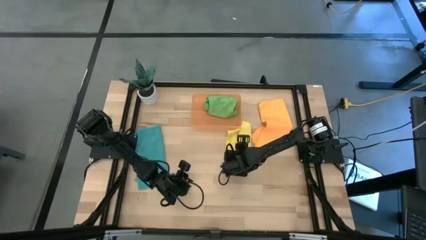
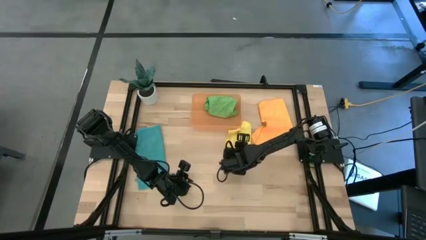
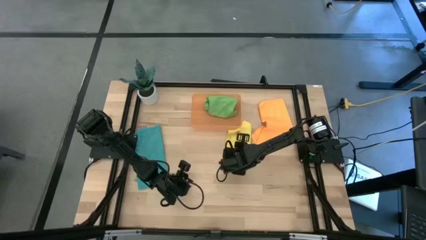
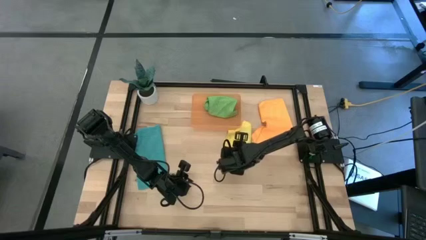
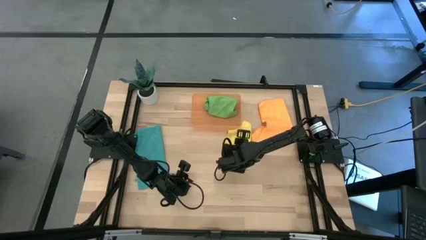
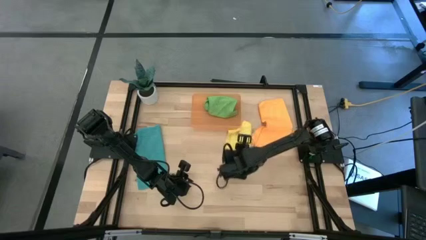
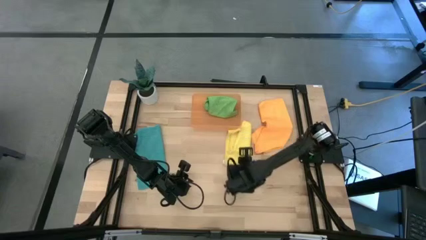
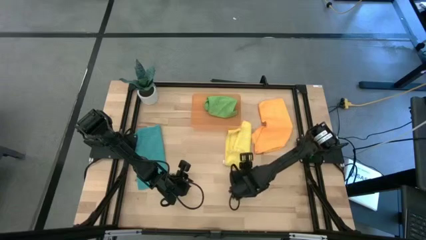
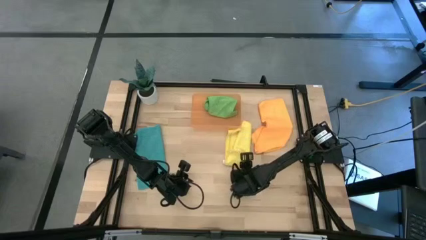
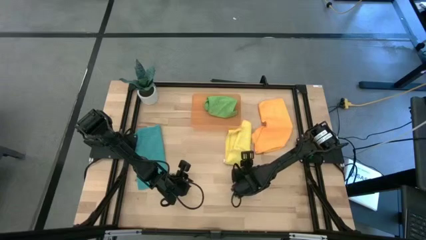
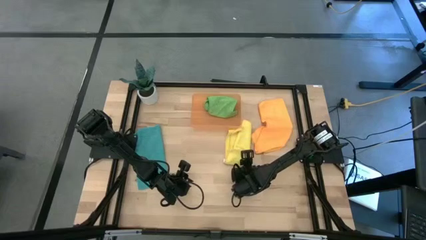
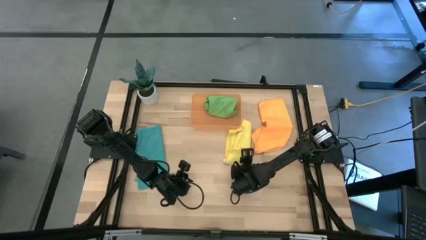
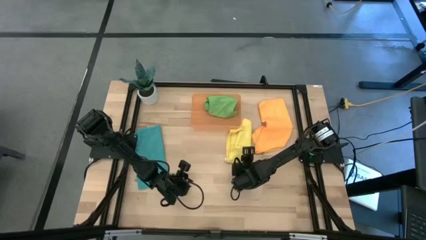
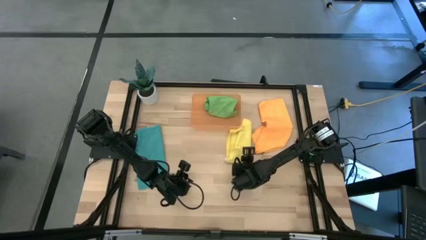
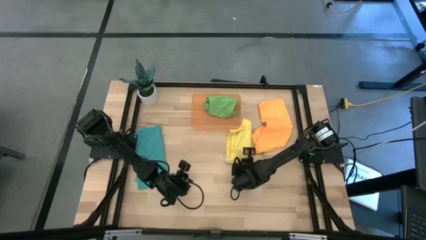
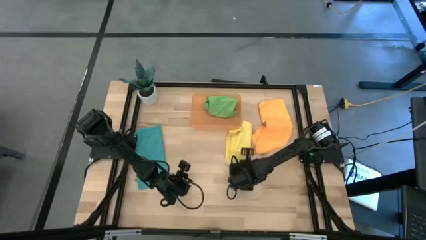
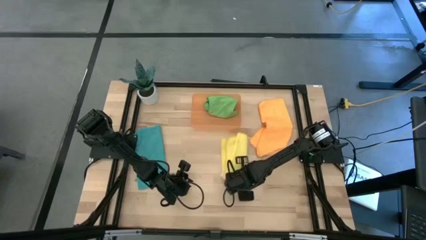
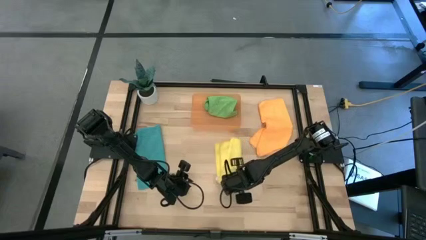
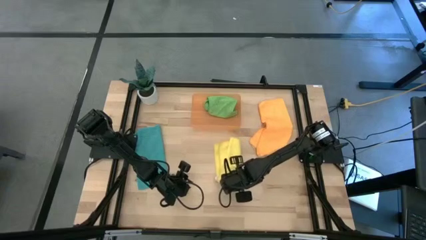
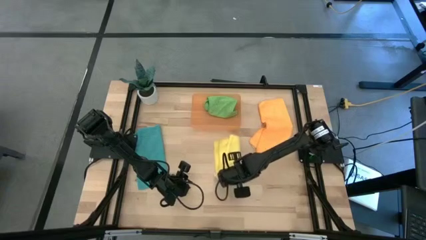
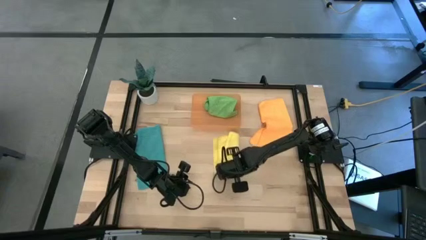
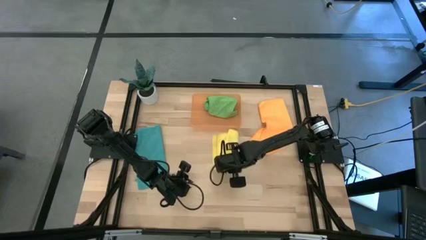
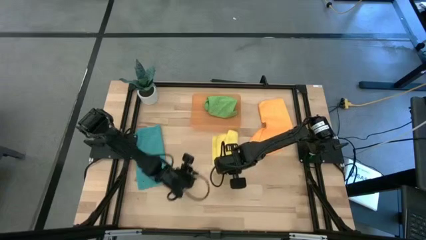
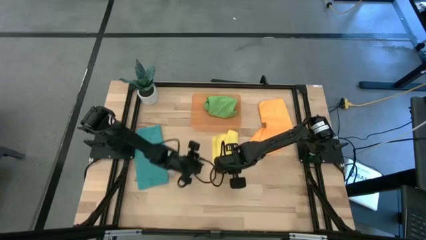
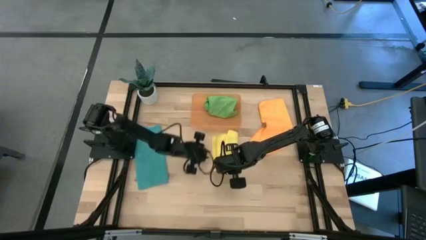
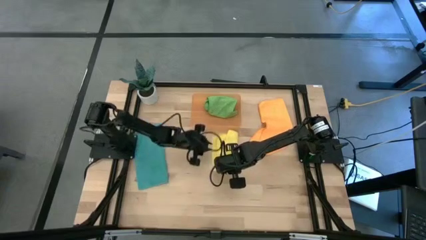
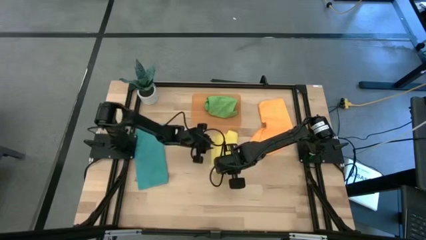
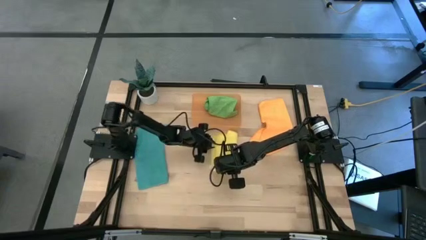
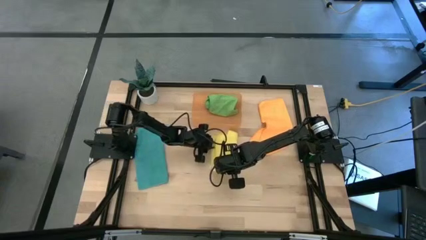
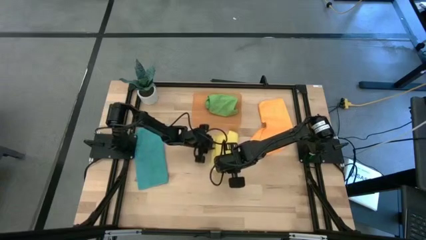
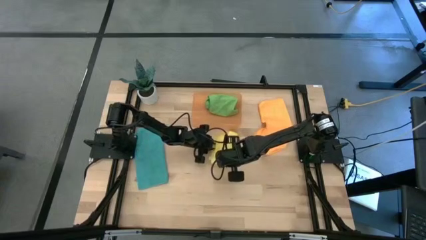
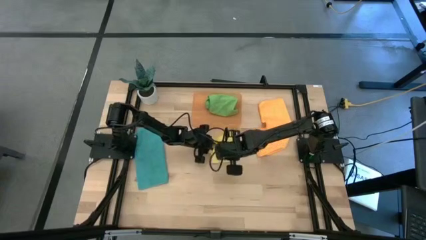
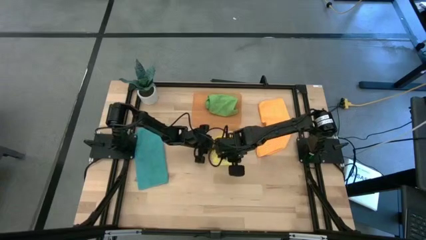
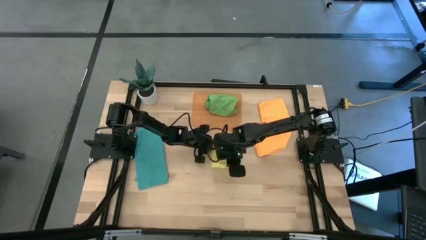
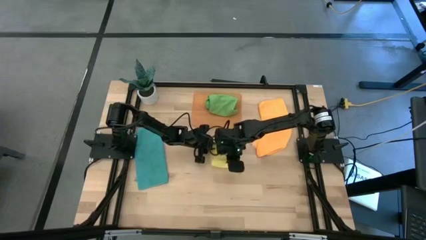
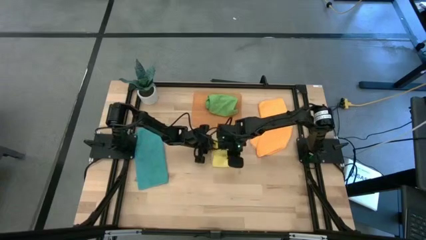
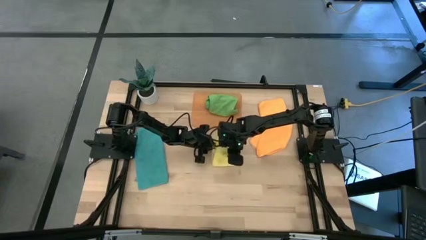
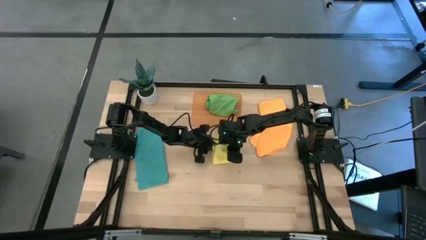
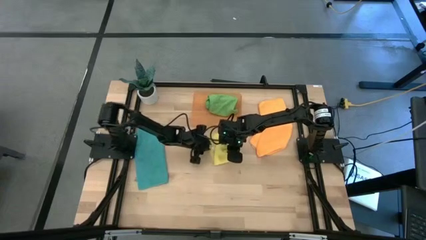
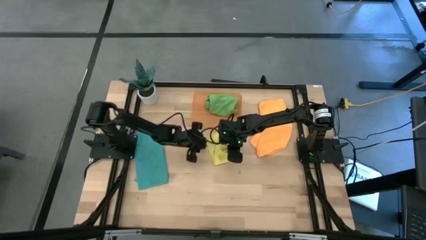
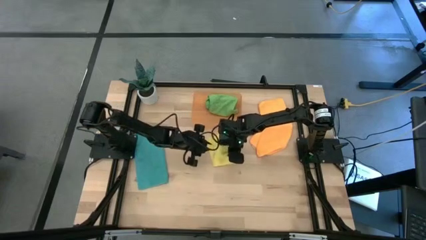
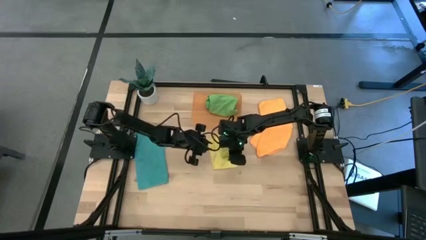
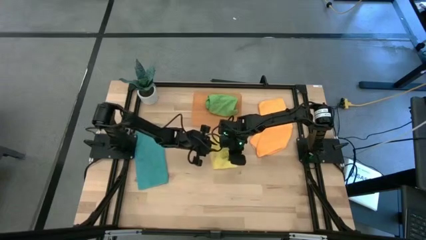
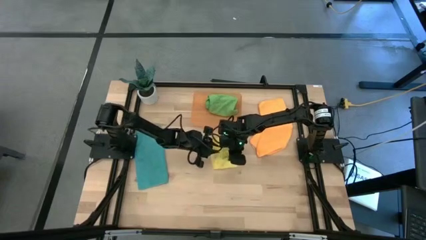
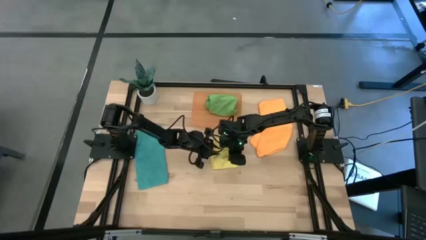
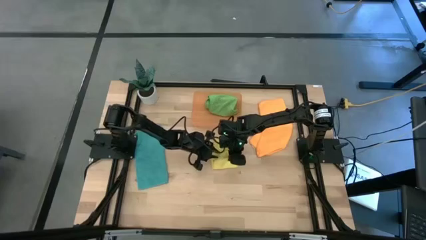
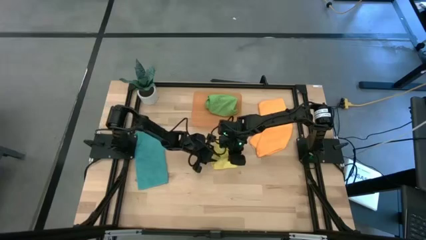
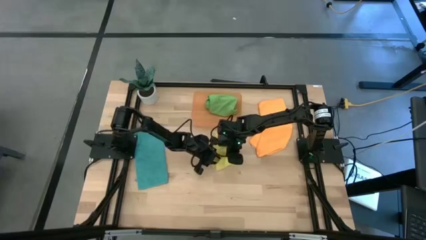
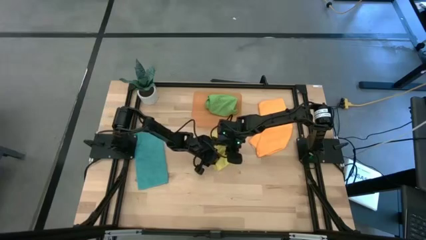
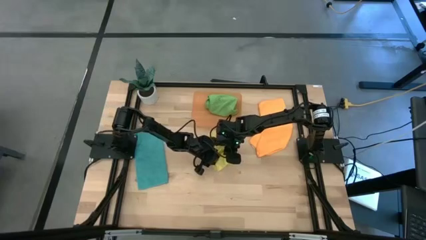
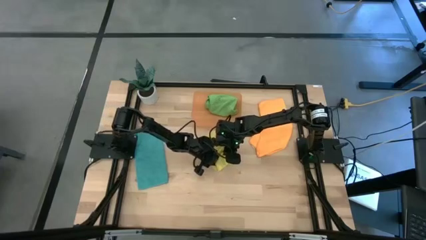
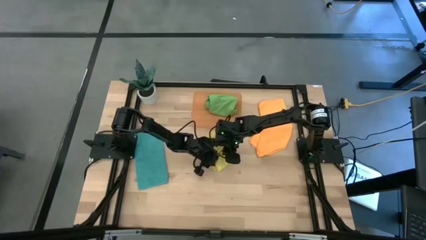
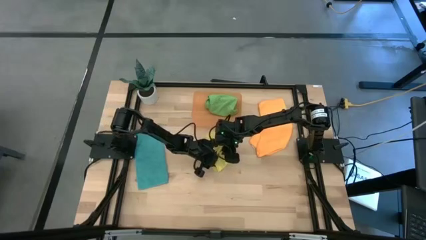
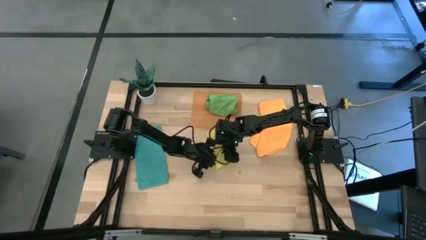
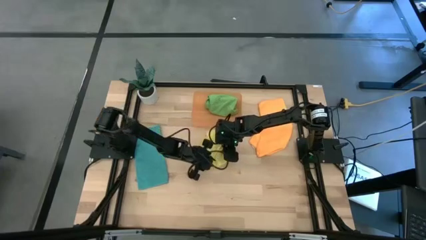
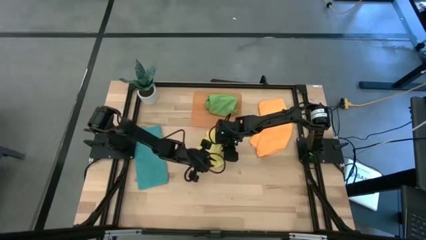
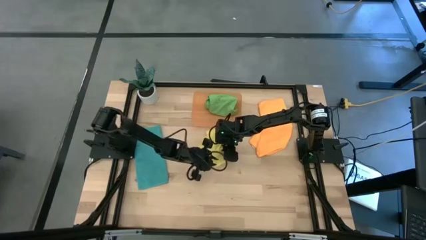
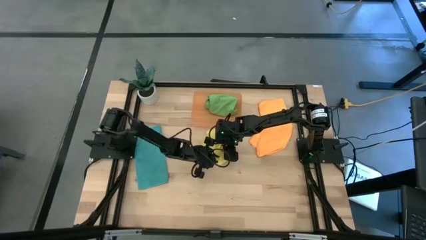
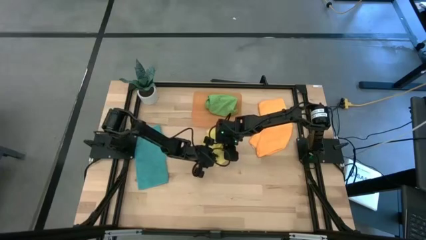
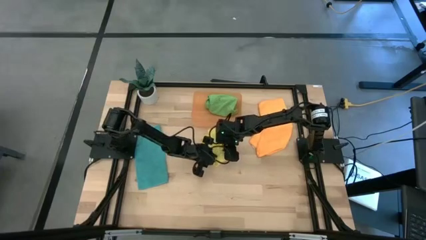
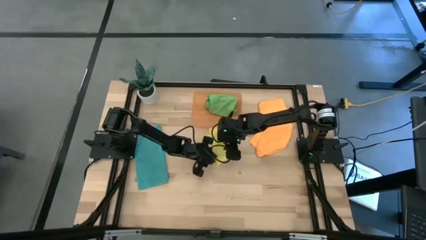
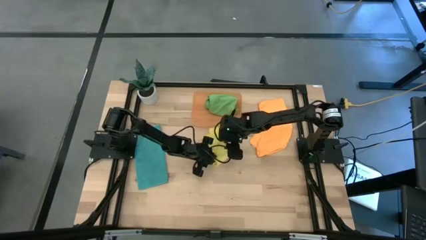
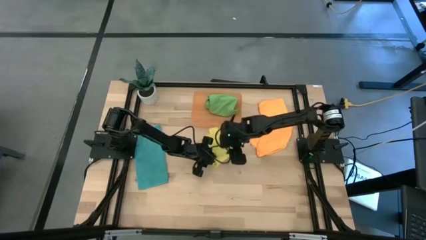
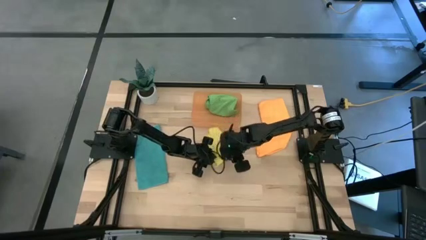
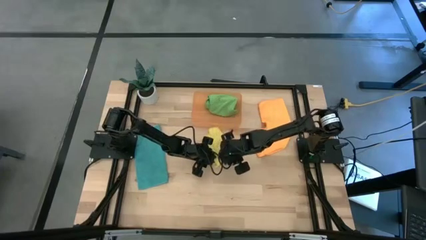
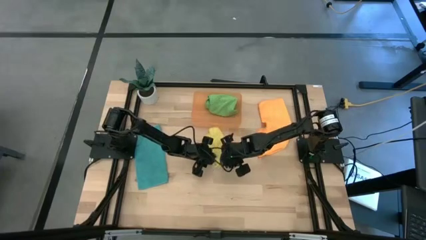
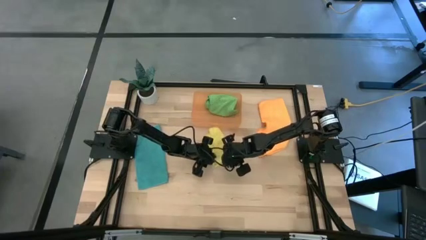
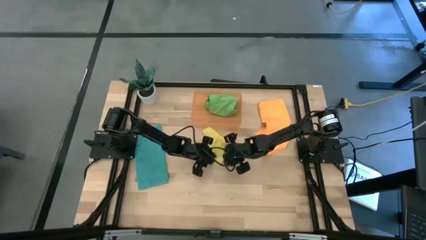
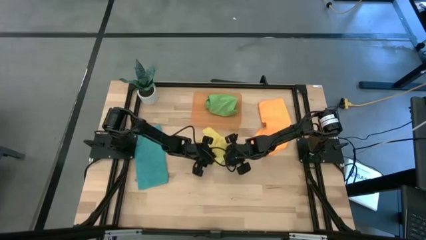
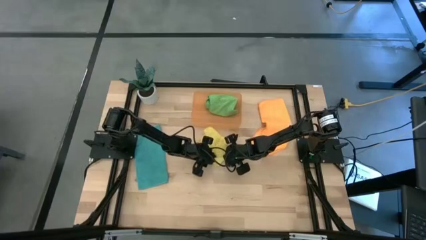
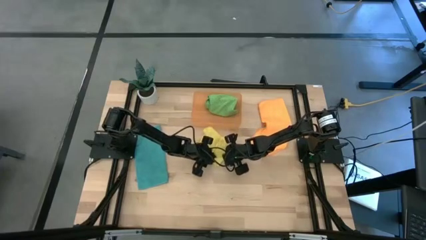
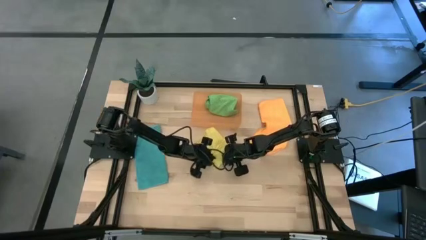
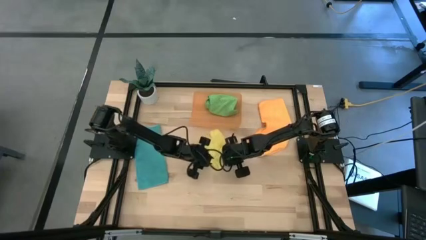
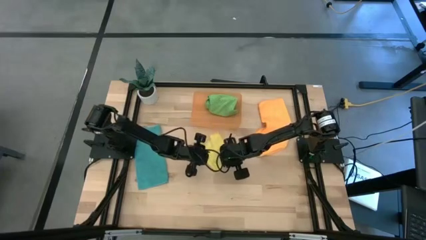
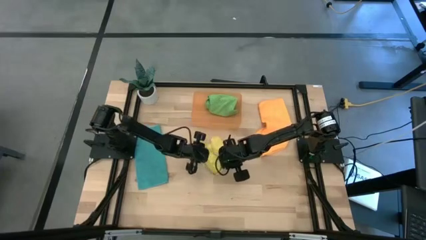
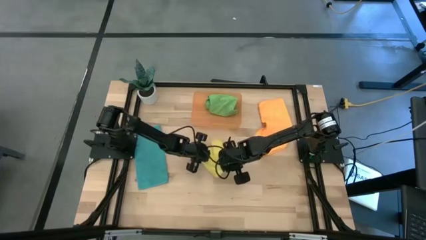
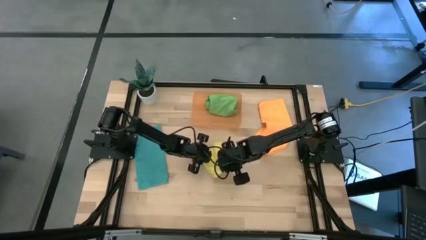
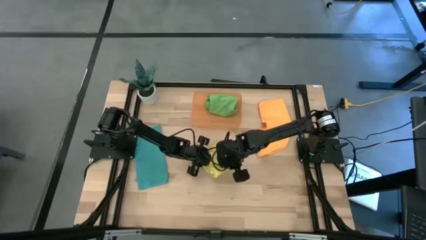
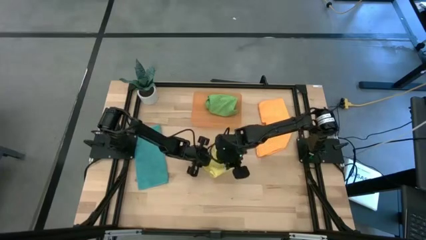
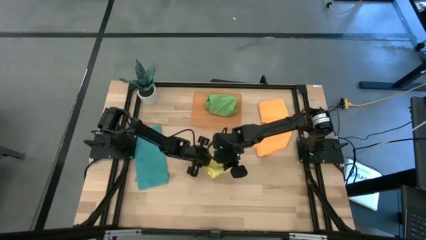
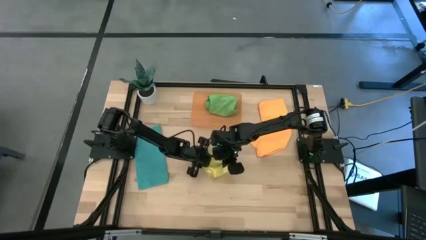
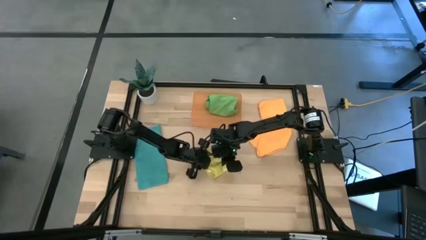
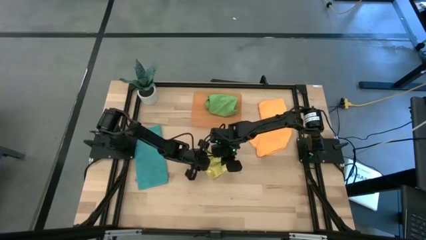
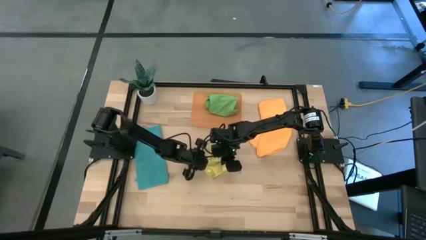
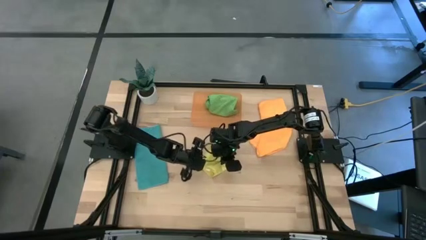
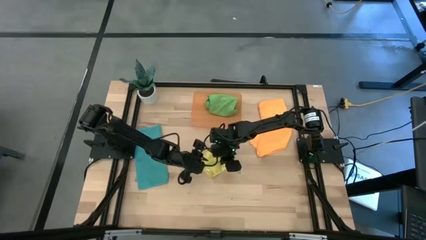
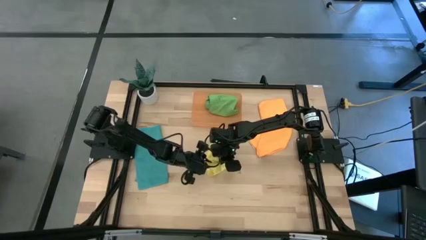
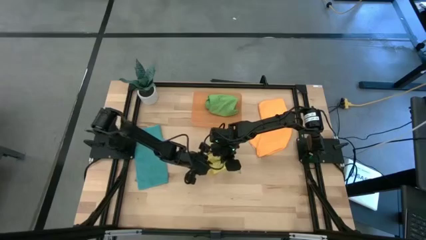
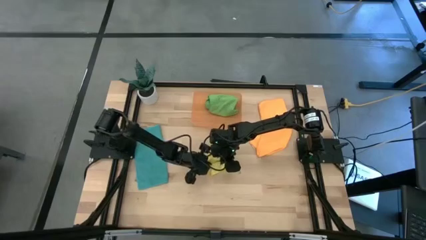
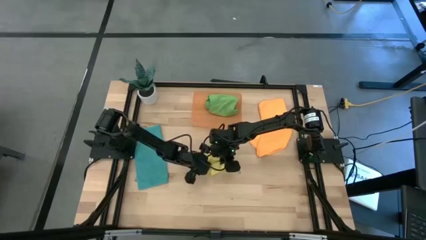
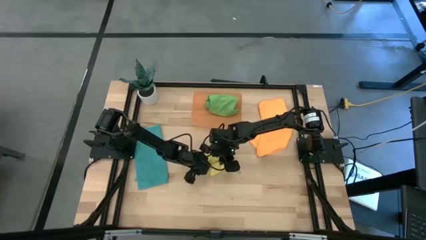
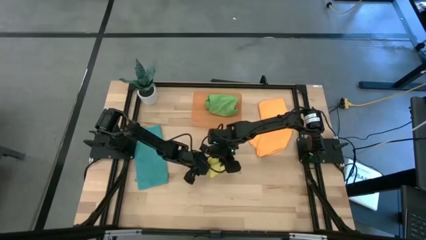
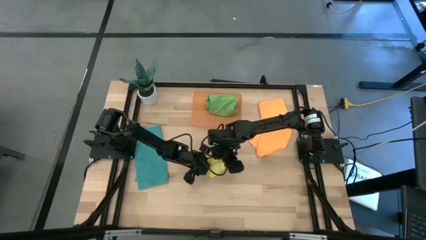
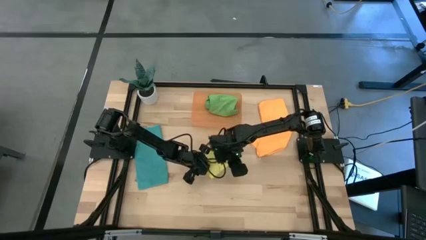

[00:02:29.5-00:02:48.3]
Task: Roll microfiber towels into tight, uniform cylinder then place into a basket
Roll the yellow microfiber cloth
